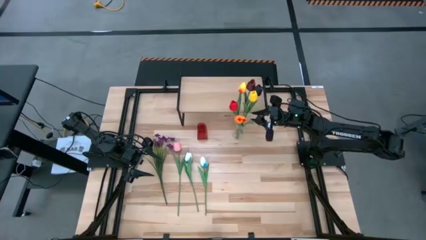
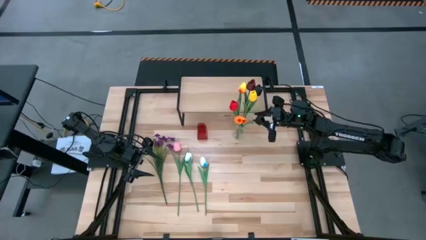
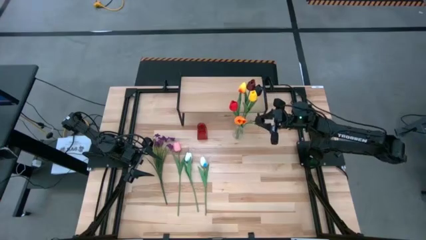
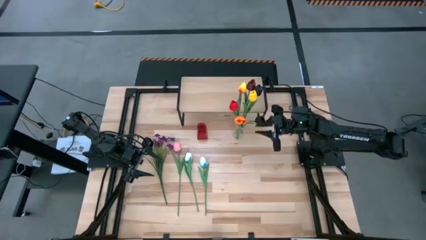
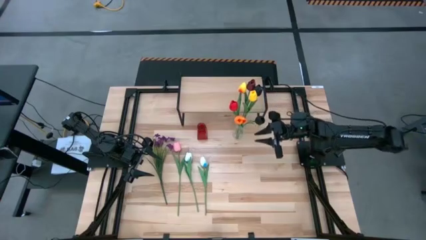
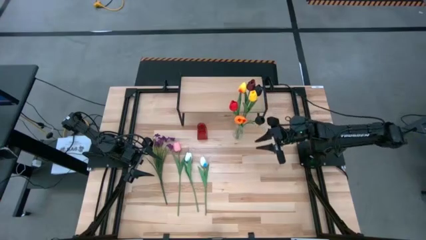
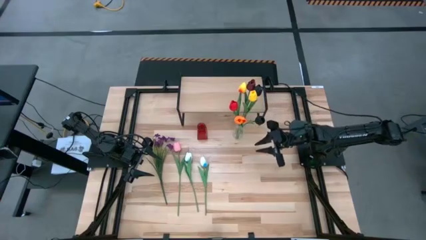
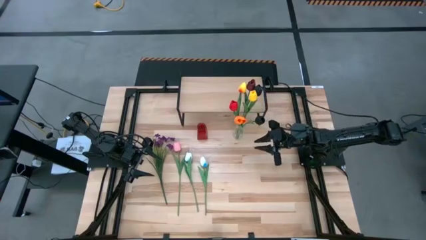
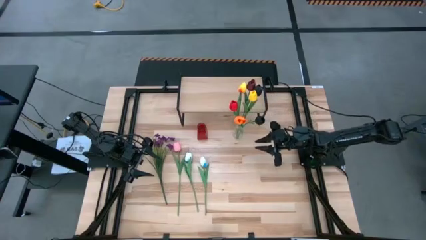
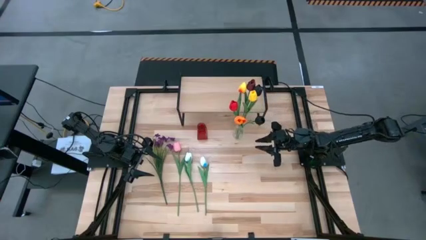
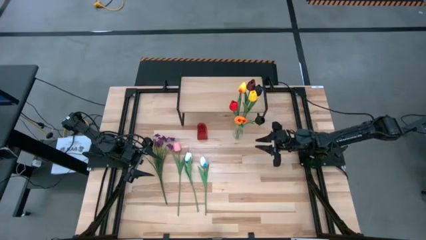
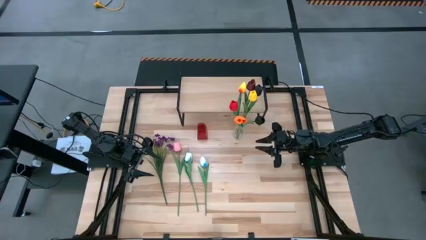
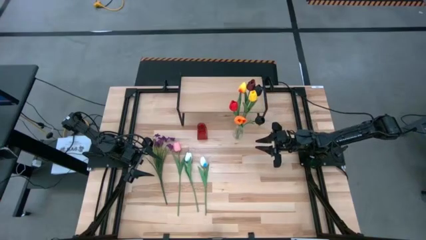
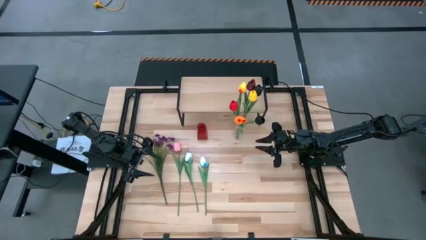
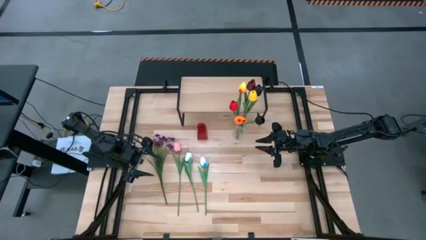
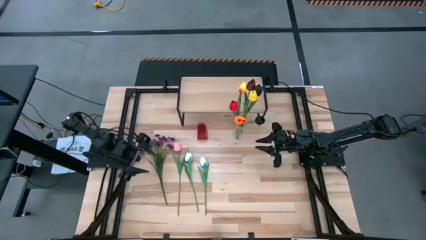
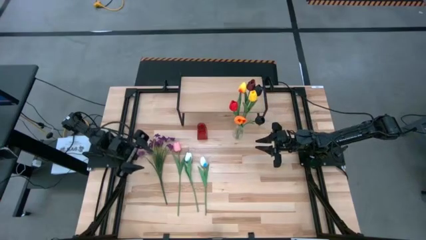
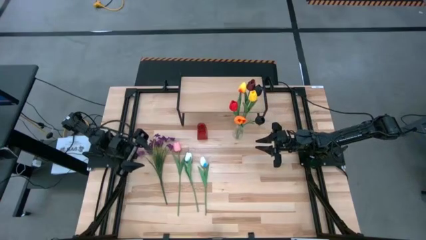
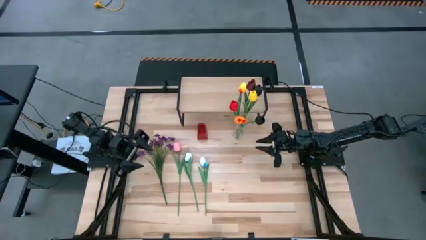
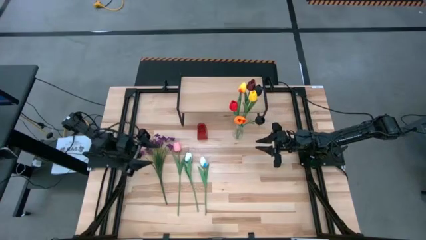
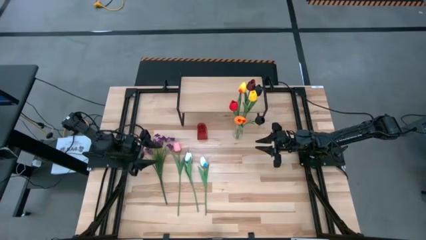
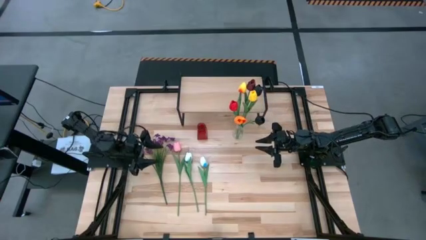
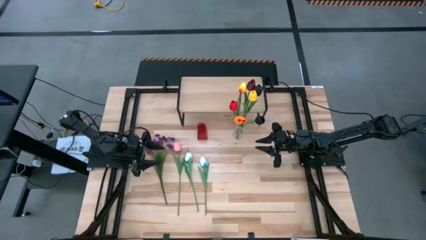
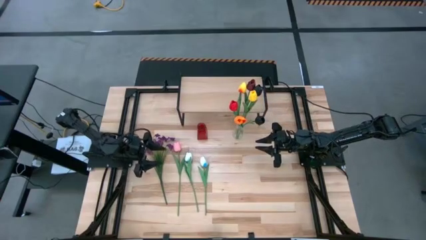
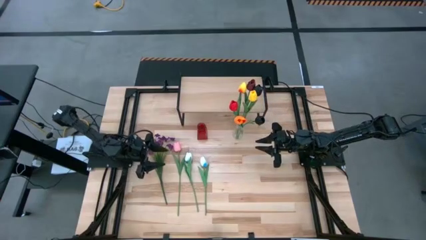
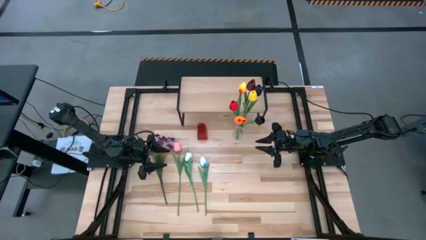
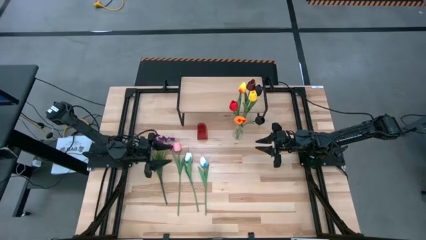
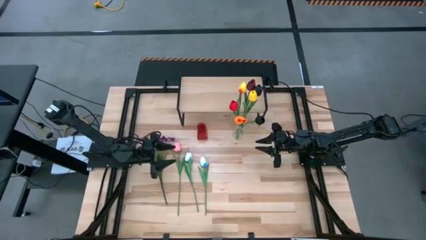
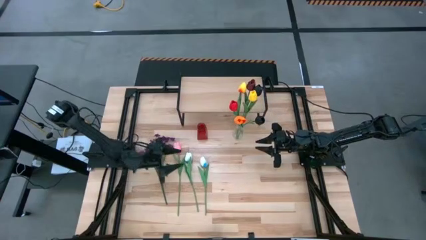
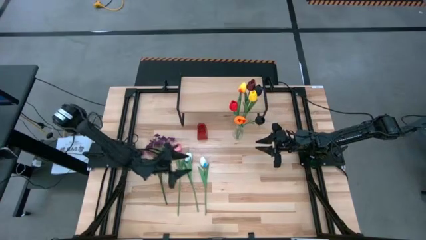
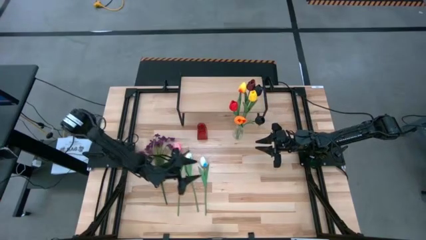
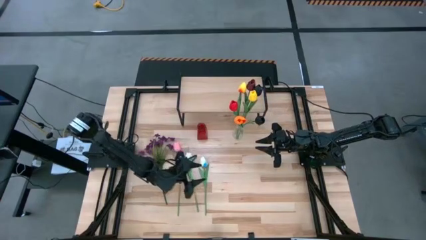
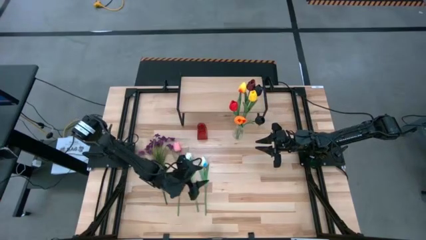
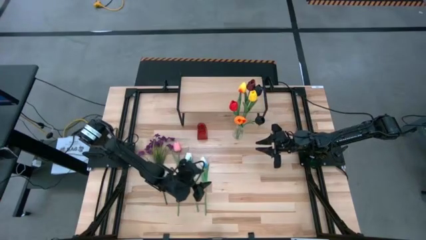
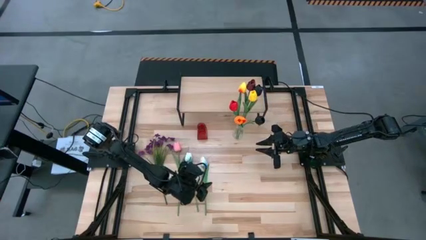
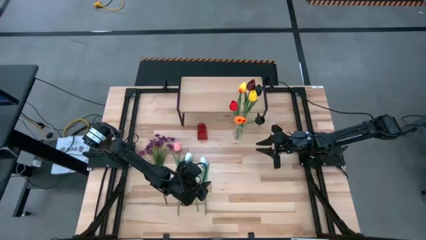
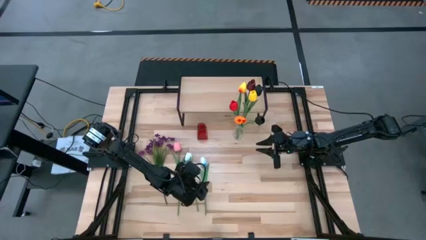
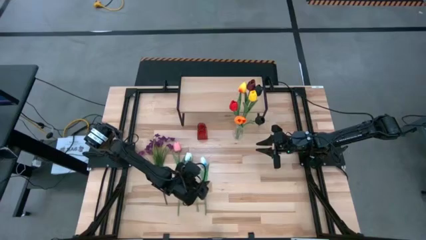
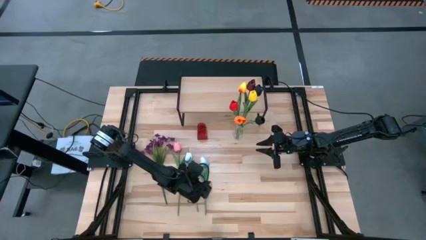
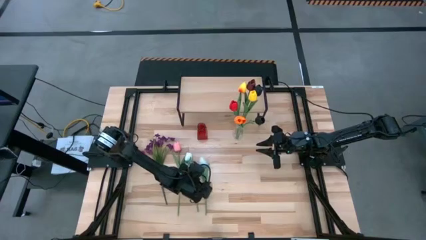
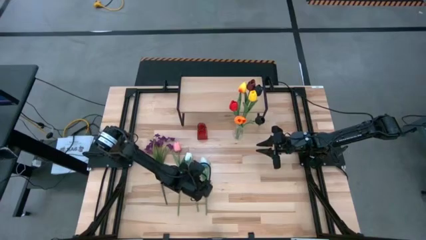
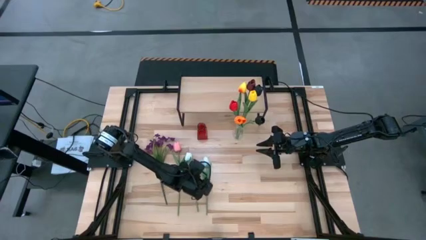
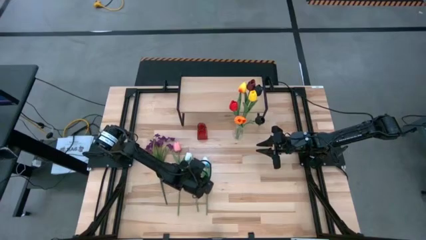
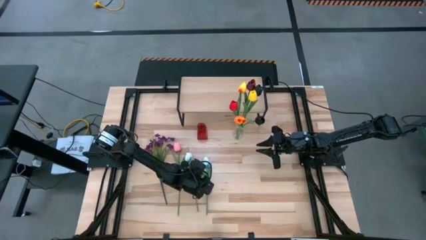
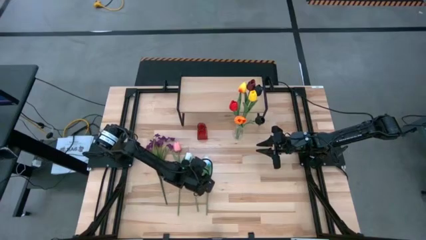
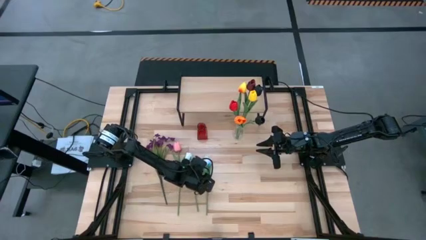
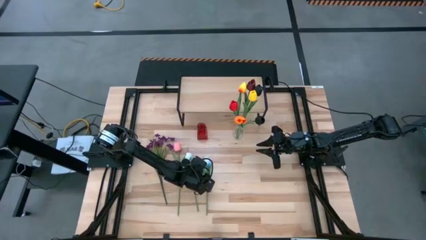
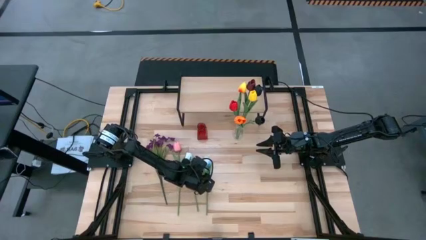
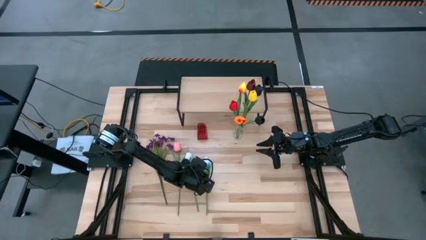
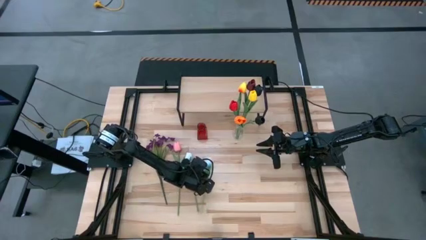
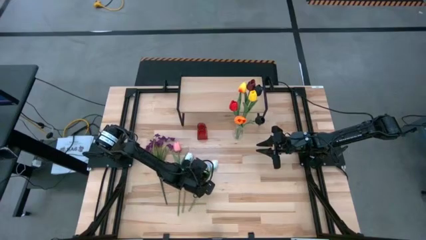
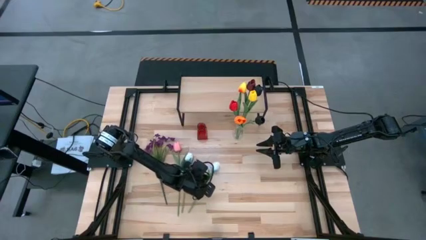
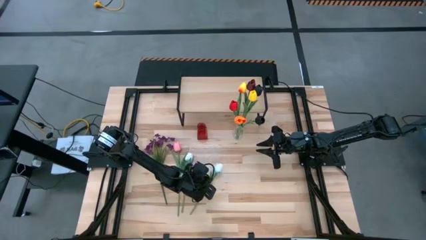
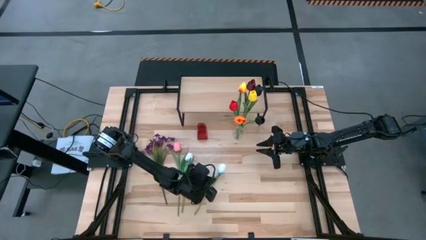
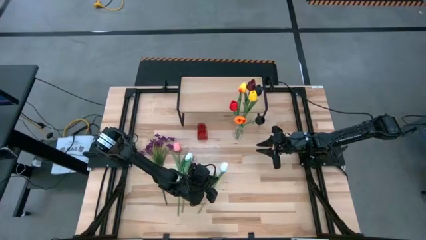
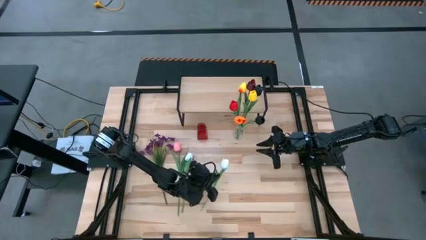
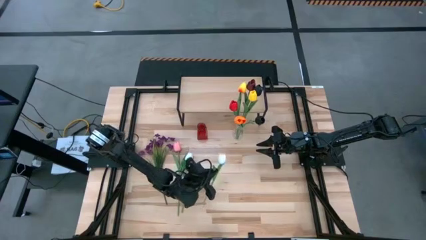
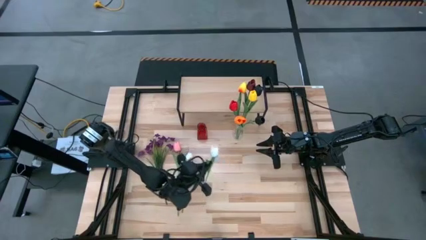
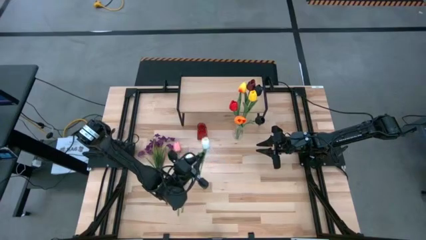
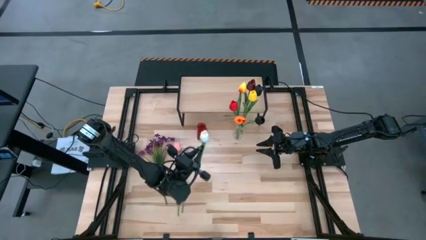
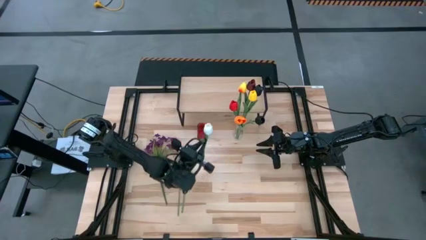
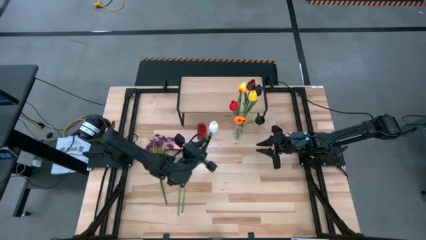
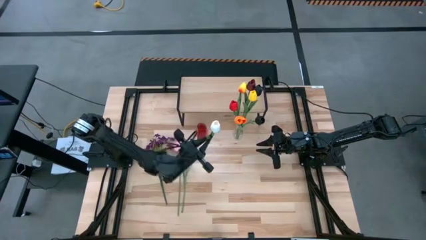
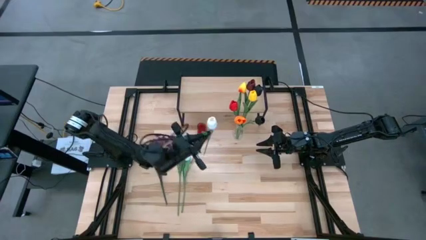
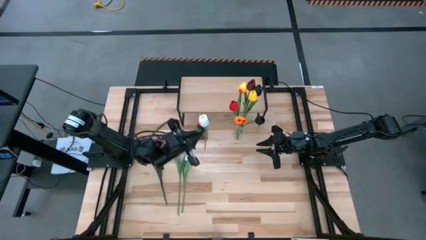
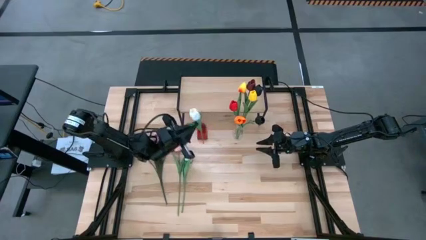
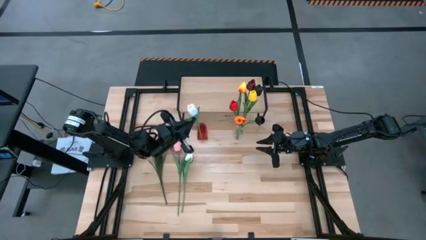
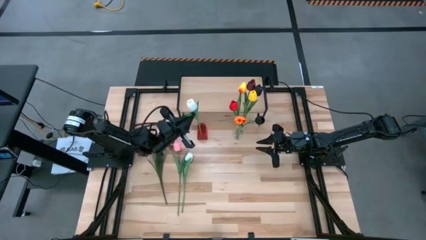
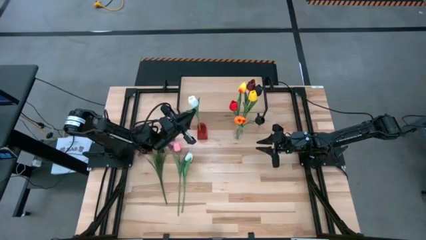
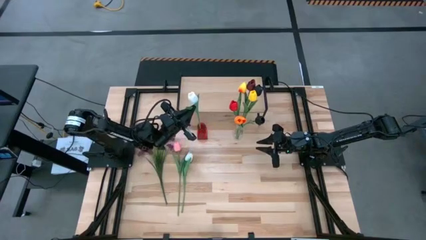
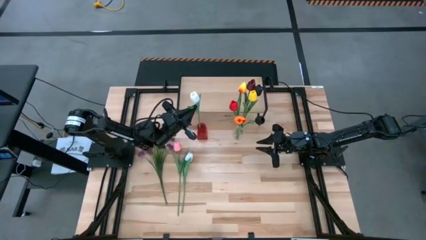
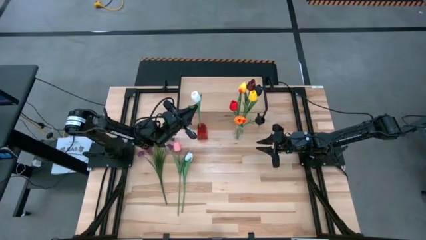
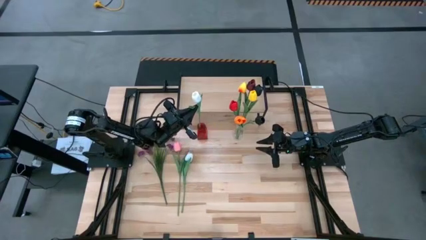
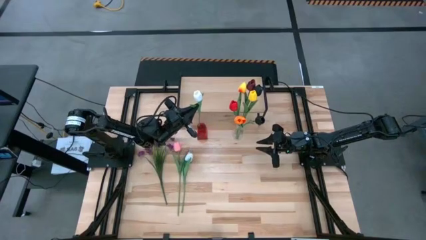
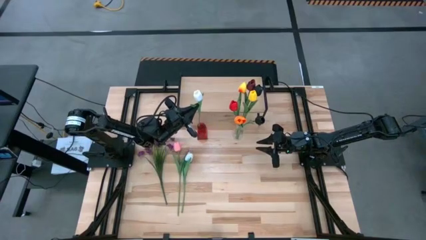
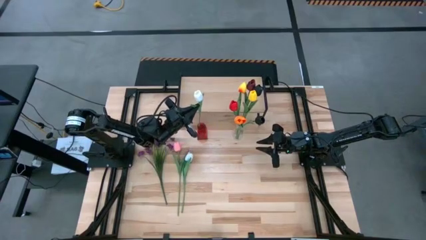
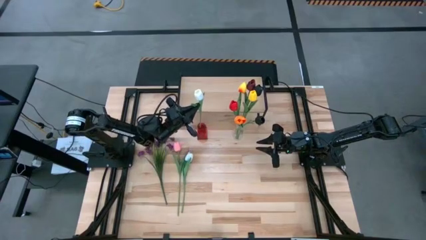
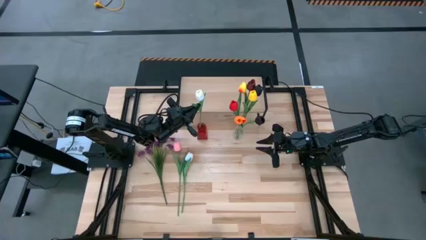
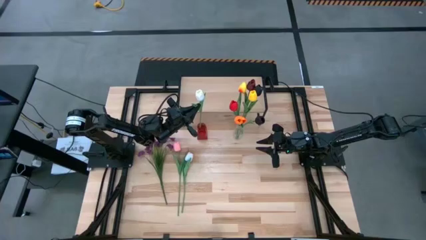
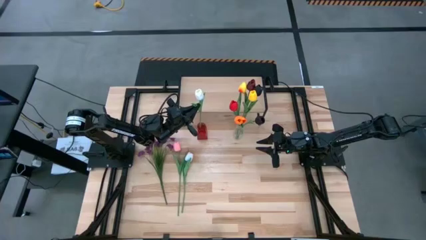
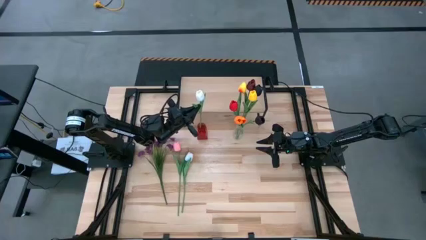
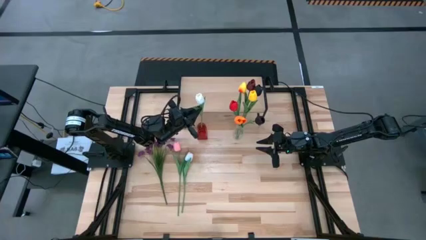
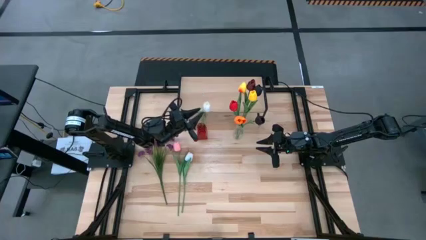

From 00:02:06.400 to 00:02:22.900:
Task: Pick and place flowers into a vace then onto a shelf
Put the right white flower into the red vase
